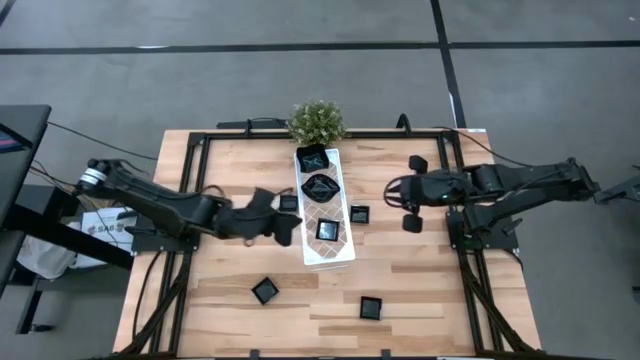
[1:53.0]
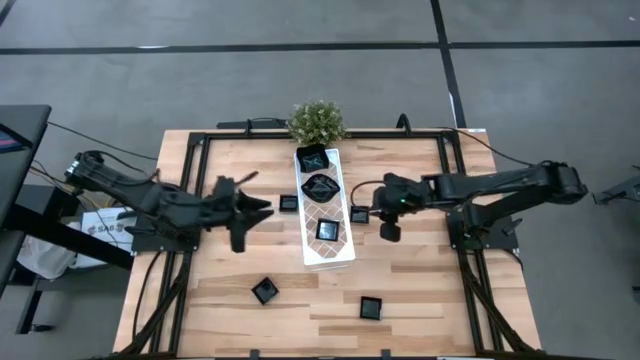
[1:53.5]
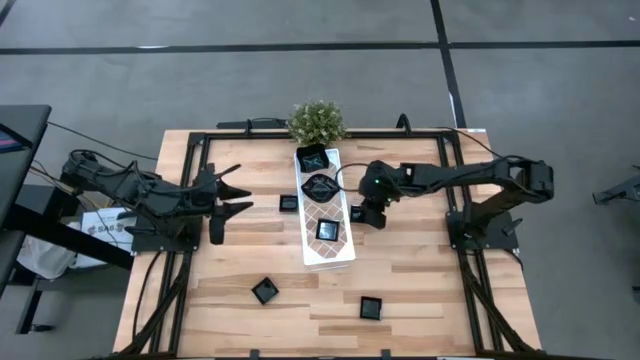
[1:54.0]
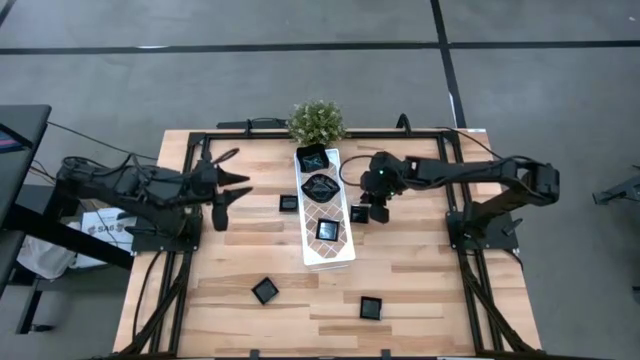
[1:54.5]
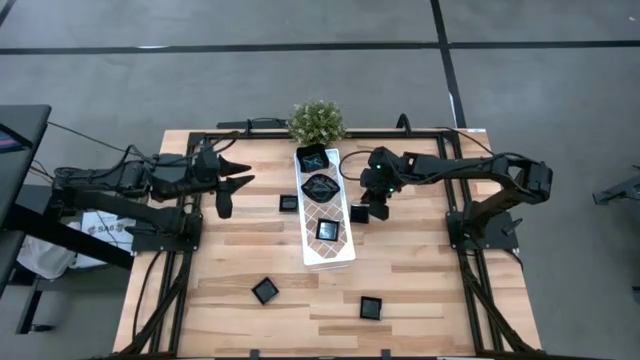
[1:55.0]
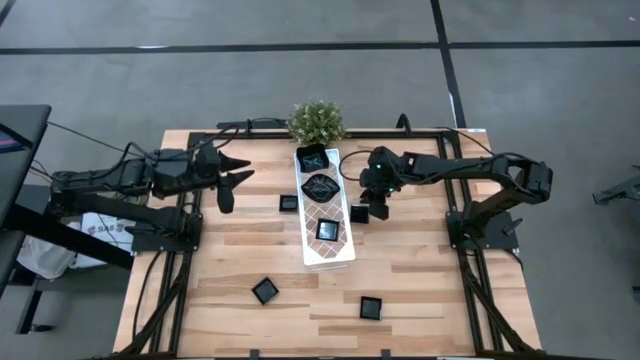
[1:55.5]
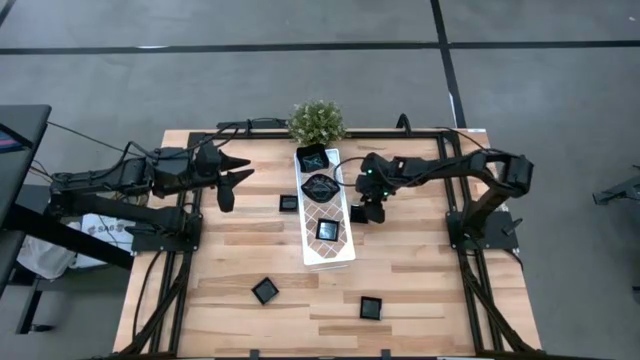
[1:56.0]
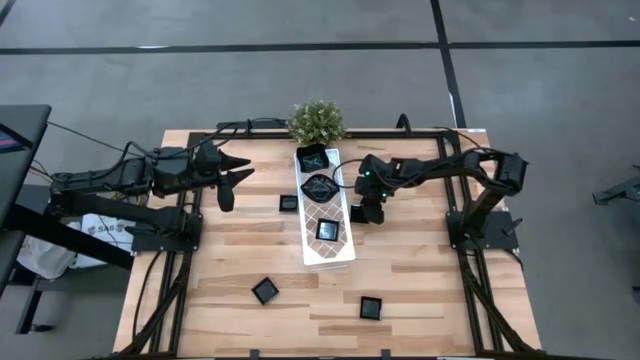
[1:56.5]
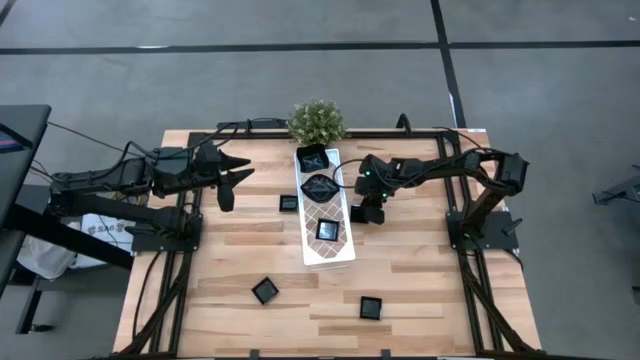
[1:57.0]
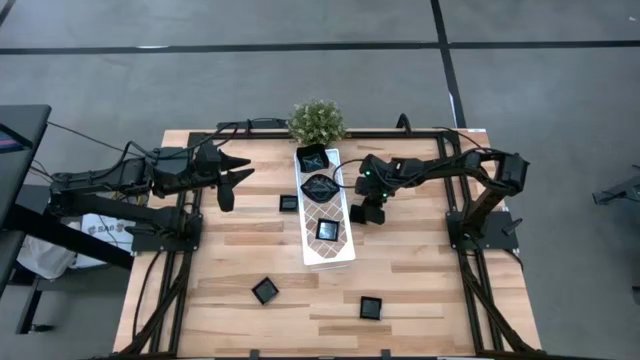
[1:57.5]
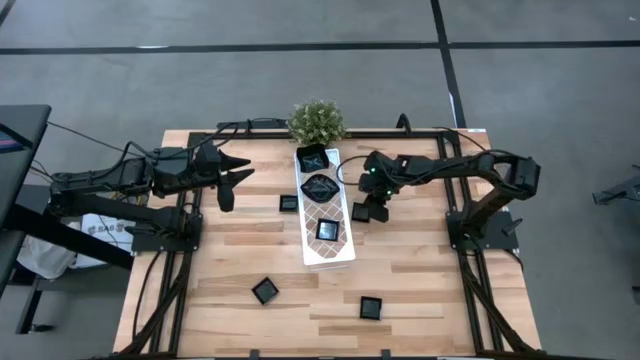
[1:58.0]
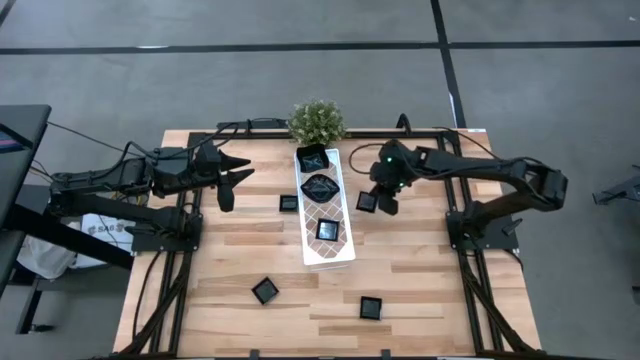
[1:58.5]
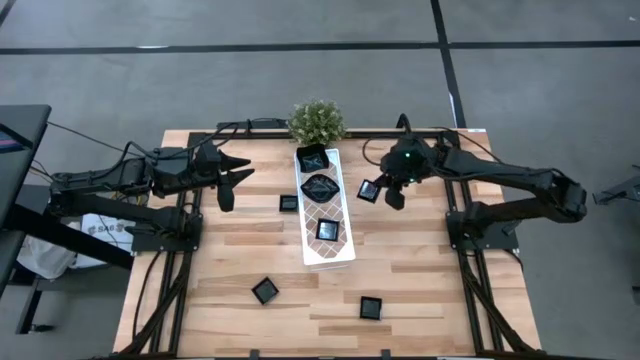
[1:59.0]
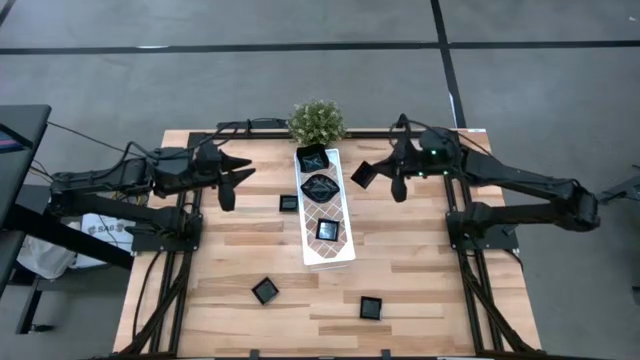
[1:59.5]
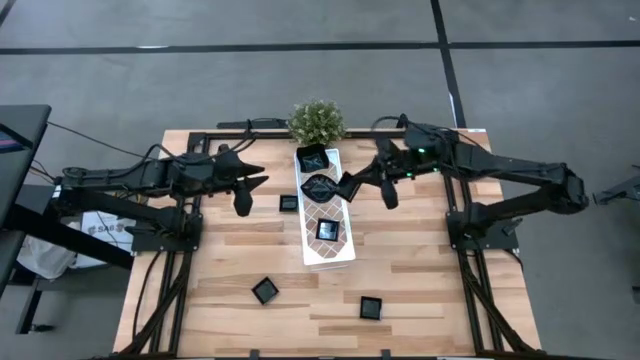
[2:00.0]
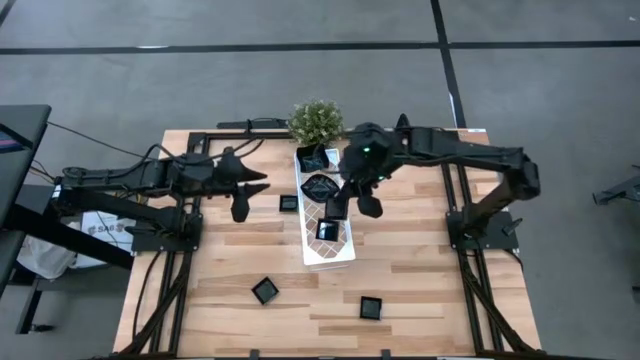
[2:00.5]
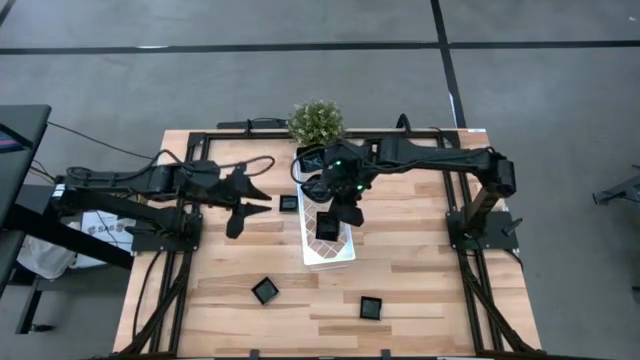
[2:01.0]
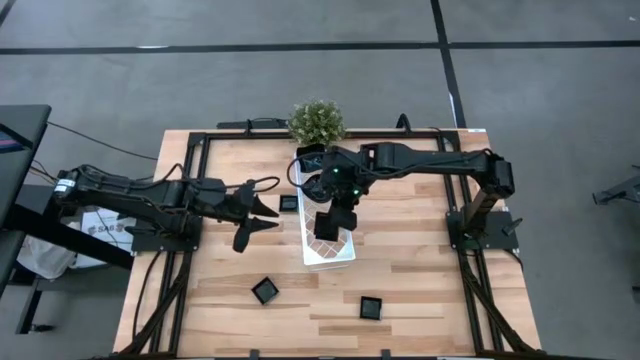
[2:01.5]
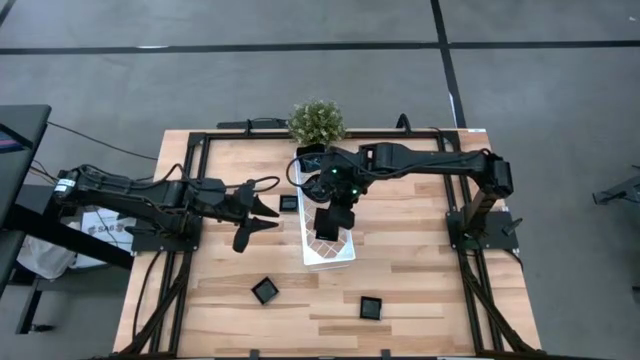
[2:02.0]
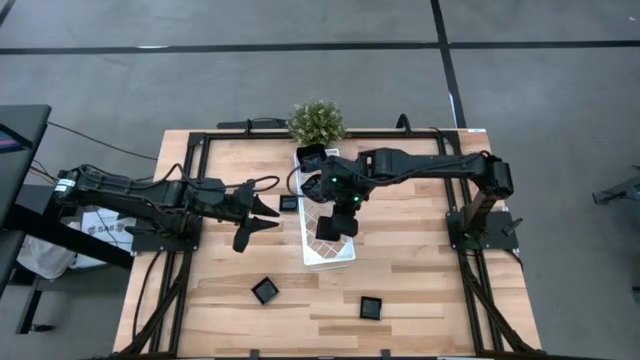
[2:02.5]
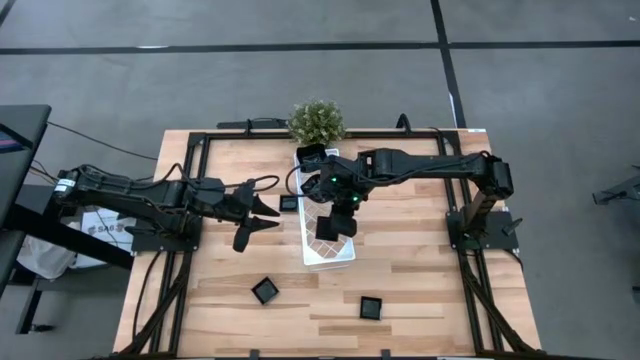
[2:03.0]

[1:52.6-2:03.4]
Task: Pick & Place Mini shaped plates
Stack the square plate on the other square plate on the shelf

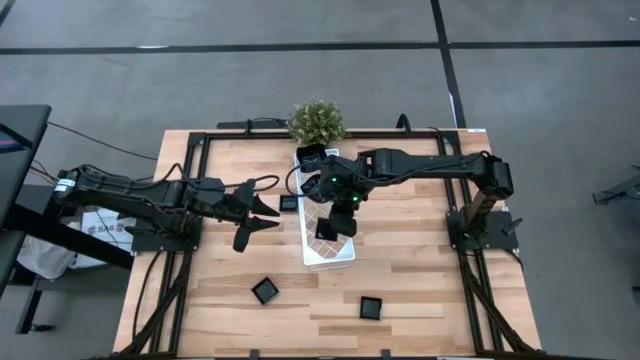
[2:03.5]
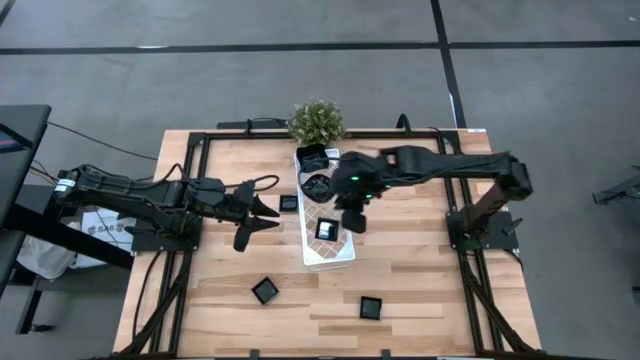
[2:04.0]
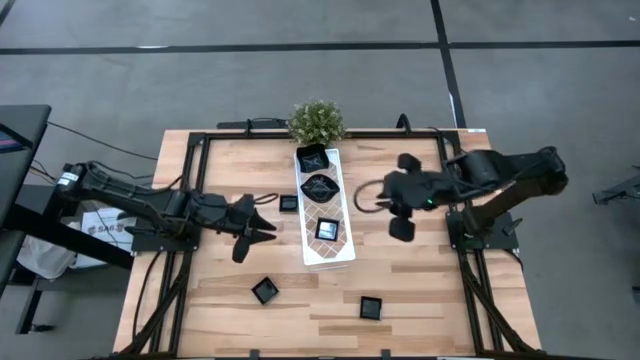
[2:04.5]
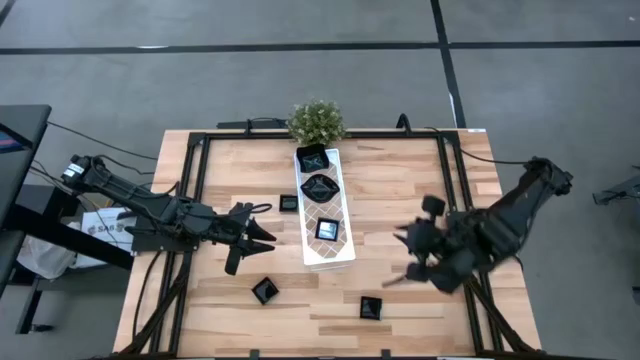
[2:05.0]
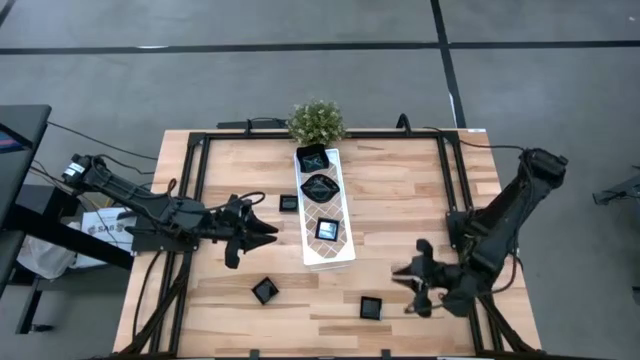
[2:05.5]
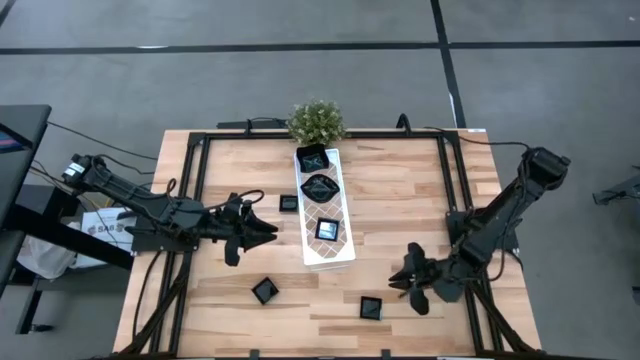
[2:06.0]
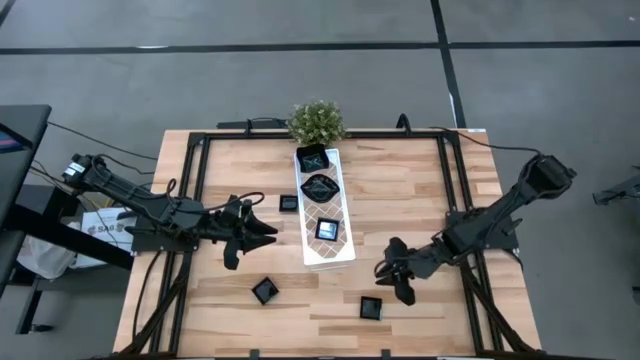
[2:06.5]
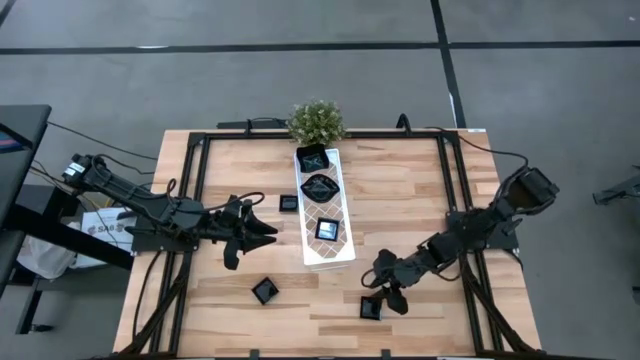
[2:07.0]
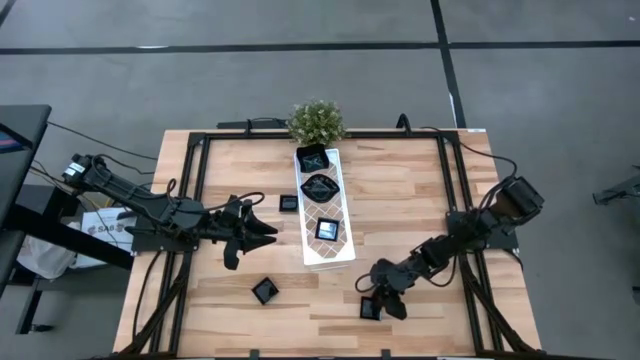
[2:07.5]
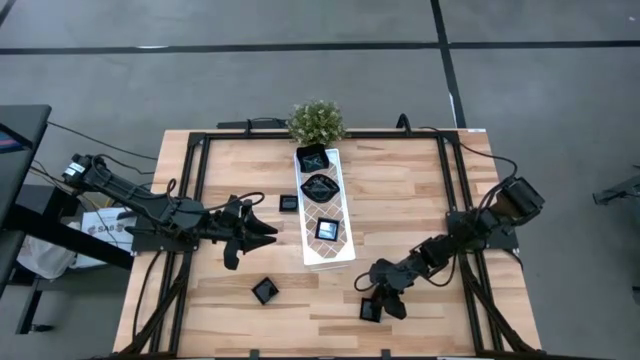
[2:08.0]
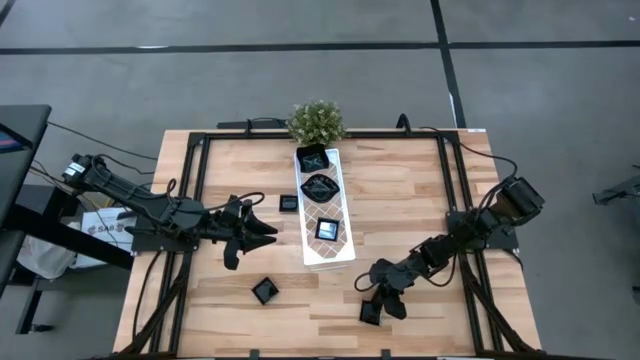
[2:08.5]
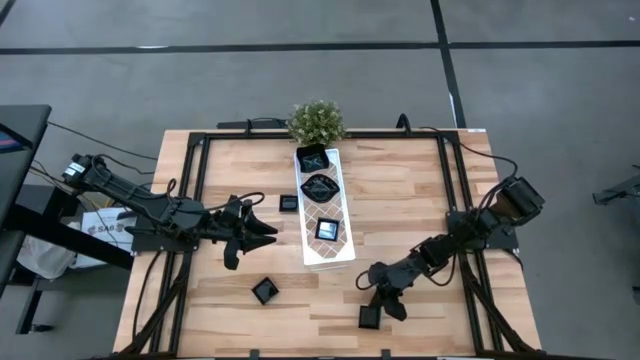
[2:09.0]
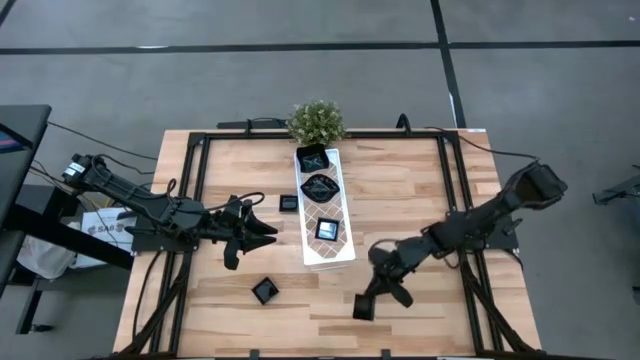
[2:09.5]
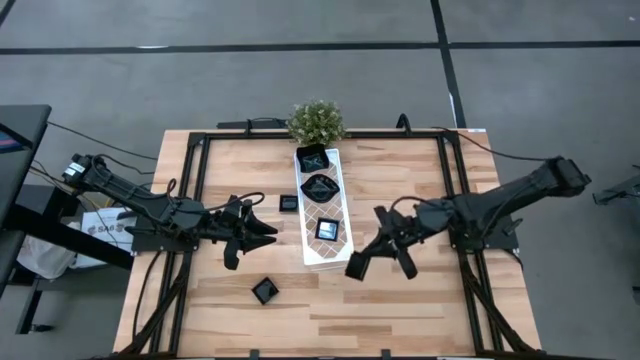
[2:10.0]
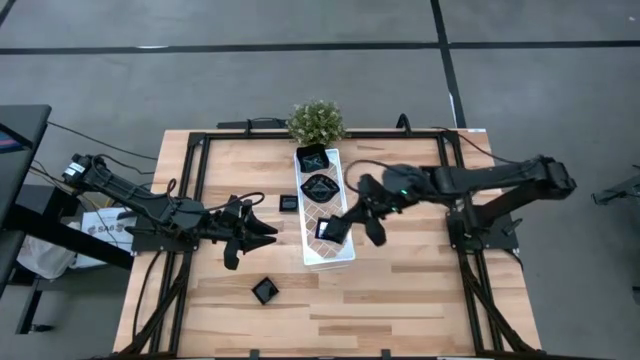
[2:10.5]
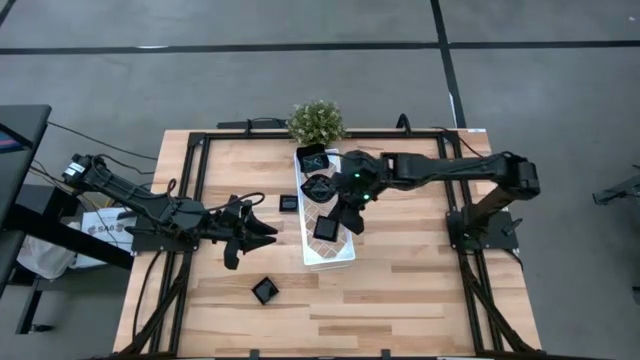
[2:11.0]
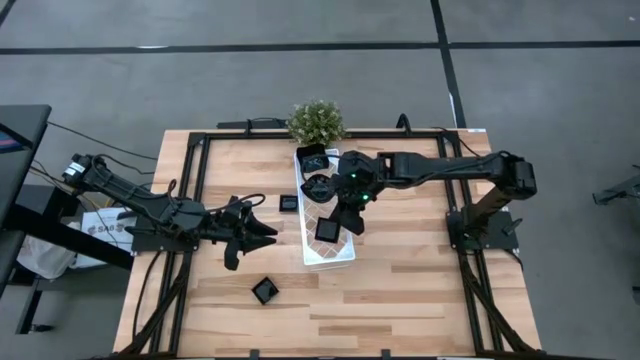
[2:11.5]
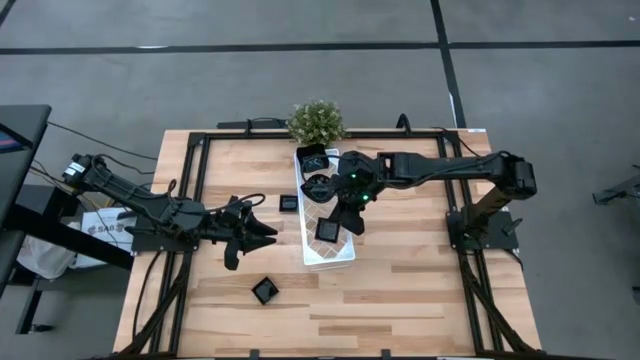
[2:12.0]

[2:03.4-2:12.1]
Stack the bottom right square plate on the other square plate on the shelf

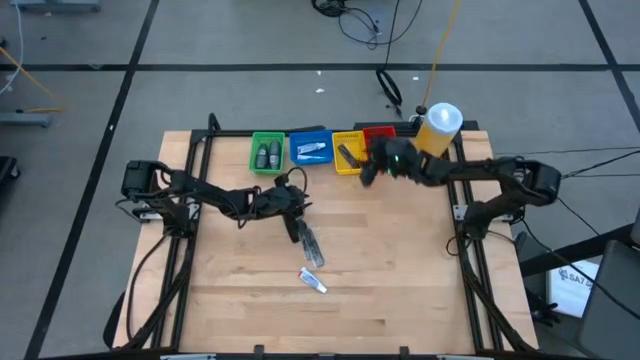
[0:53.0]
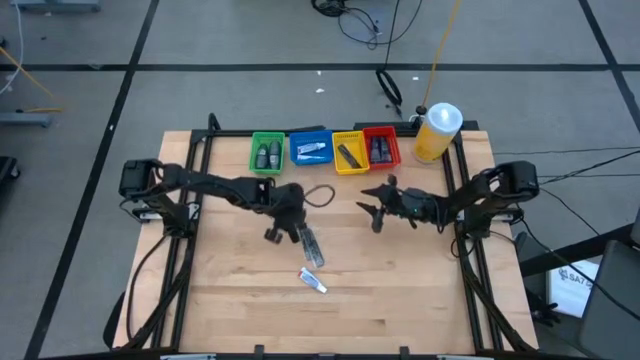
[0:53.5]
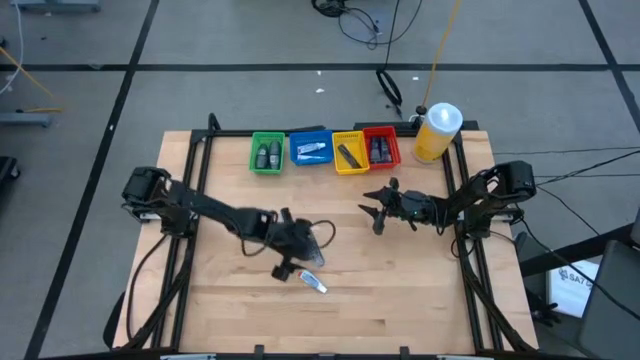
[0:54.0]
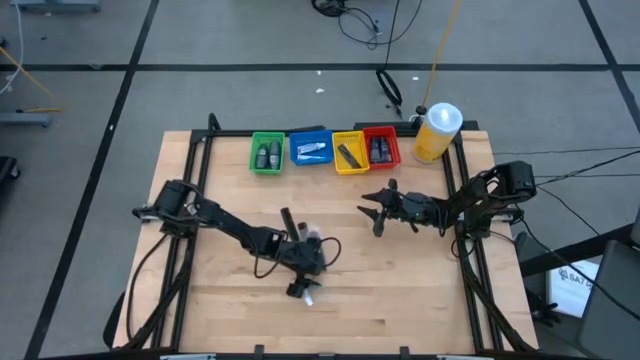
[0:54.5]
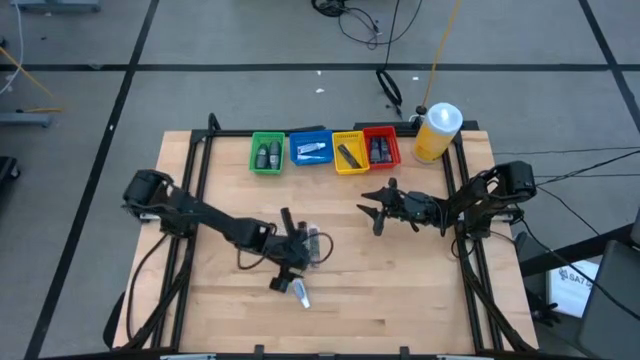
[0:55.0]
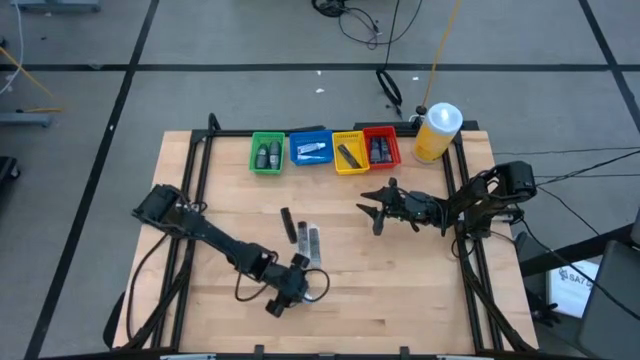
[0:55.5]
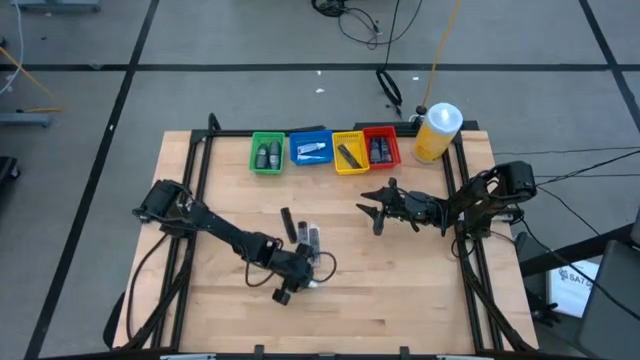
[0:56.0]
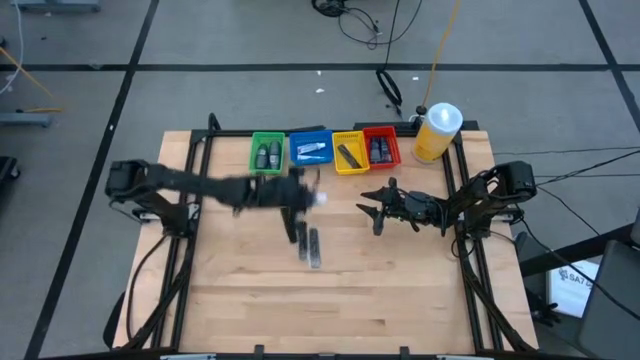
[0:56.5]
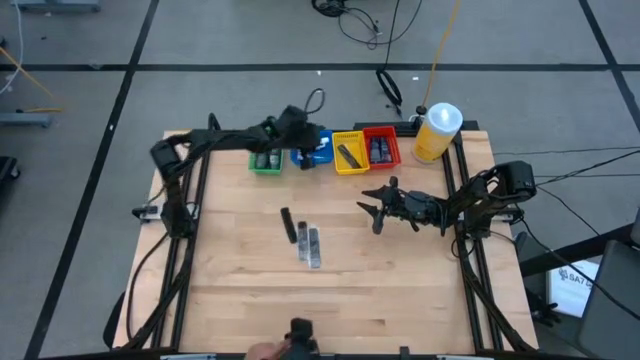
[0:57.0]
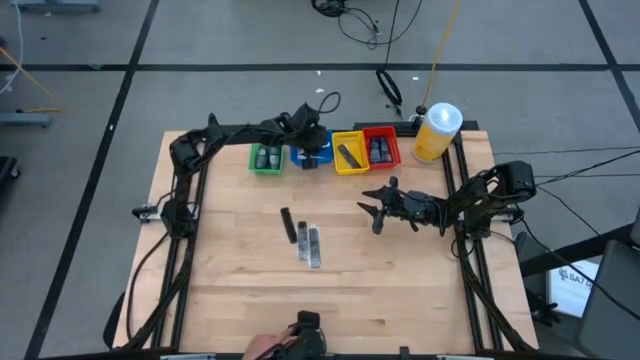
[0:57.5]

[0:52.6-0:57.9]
Task: Pick & Place Travel size toiletries
Put the white toothpaste into the blue bin
